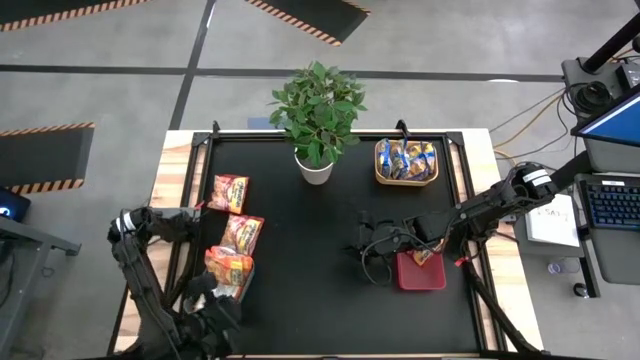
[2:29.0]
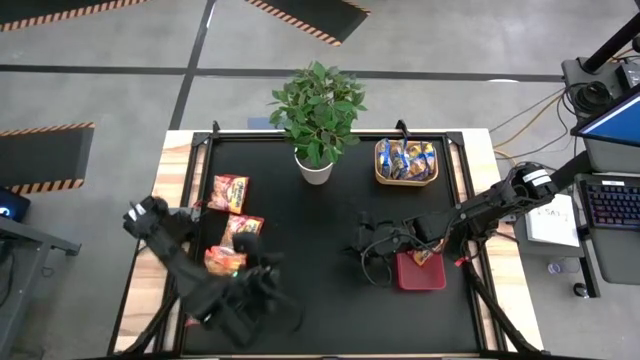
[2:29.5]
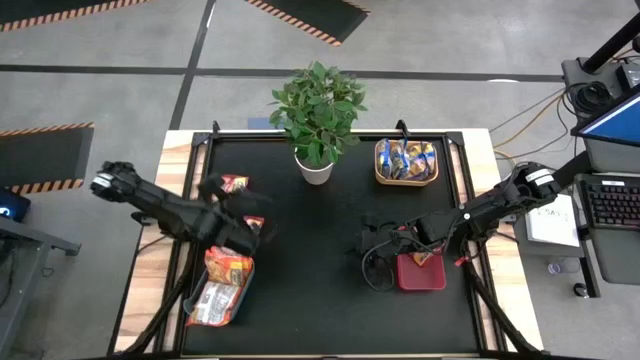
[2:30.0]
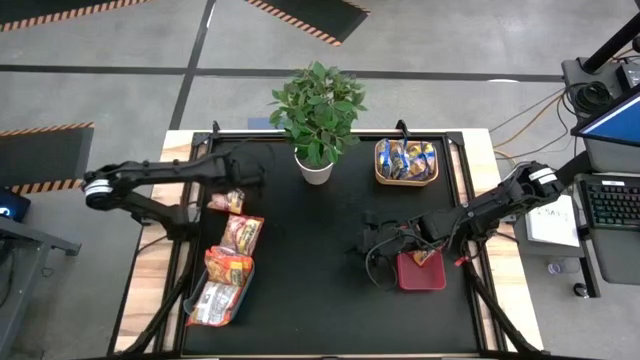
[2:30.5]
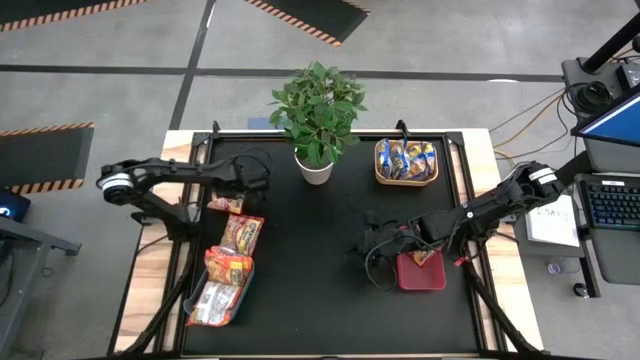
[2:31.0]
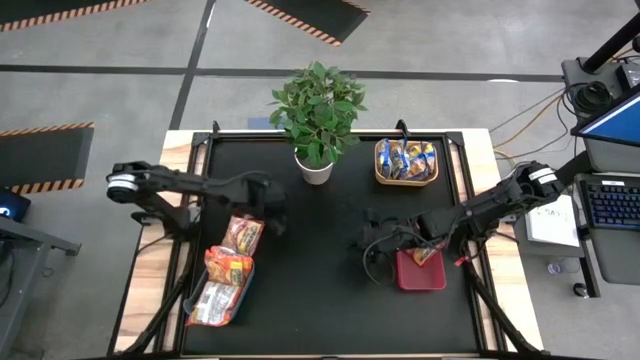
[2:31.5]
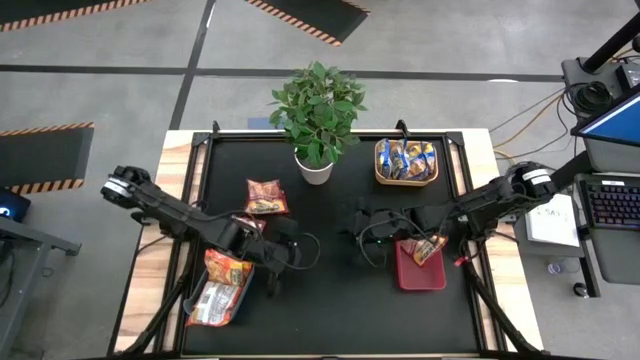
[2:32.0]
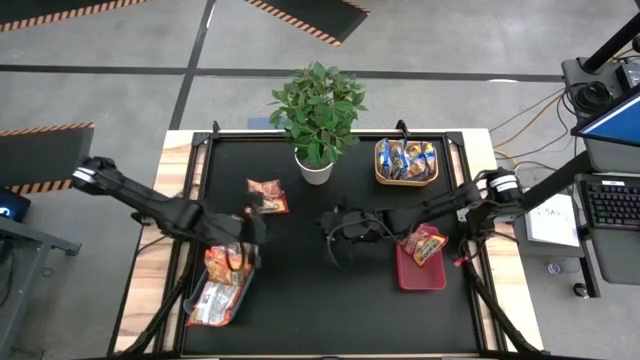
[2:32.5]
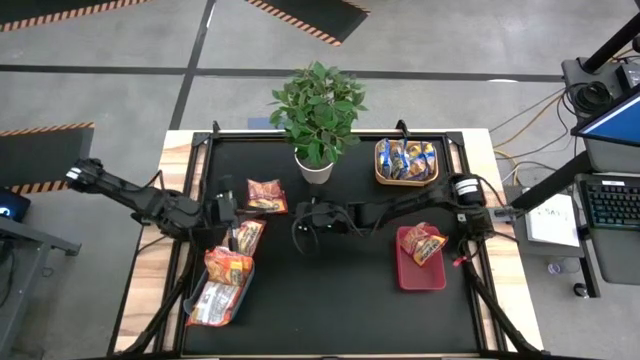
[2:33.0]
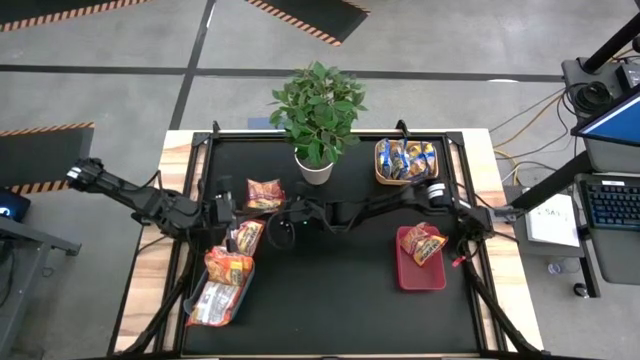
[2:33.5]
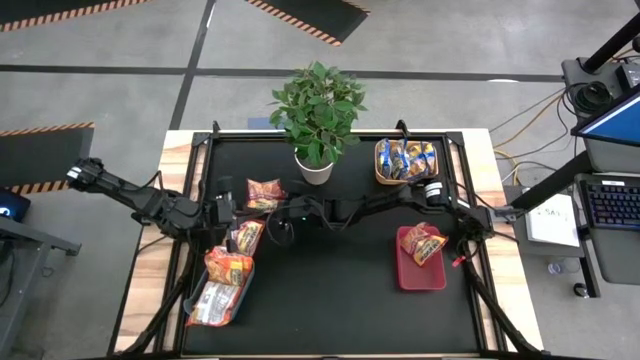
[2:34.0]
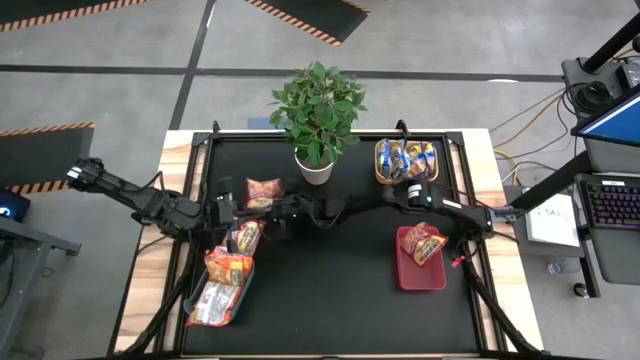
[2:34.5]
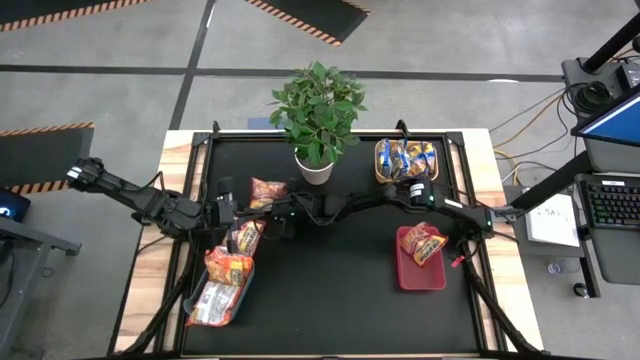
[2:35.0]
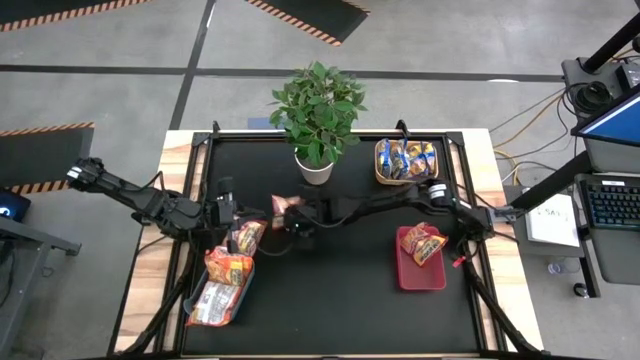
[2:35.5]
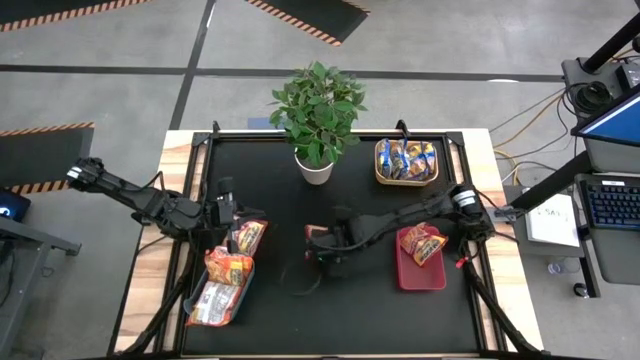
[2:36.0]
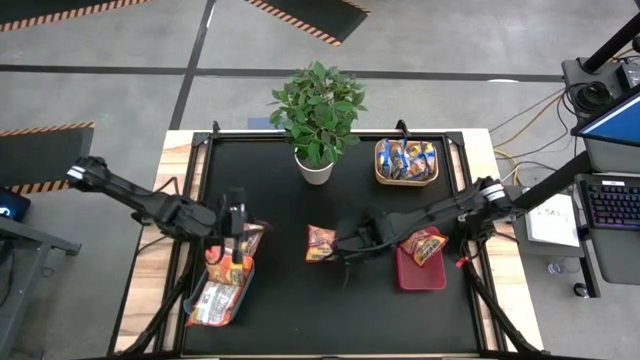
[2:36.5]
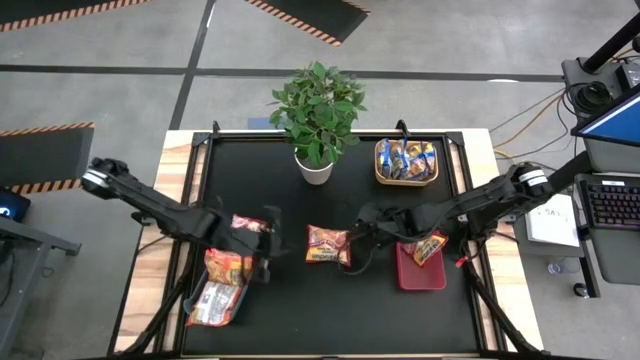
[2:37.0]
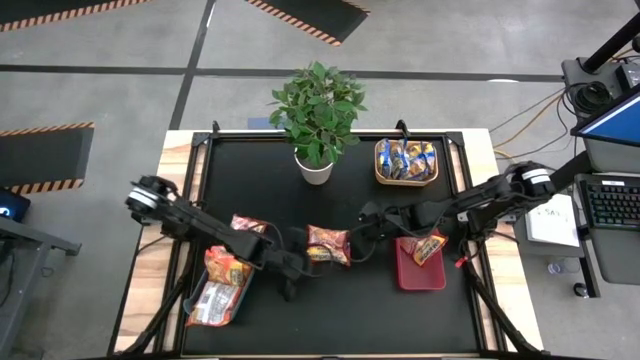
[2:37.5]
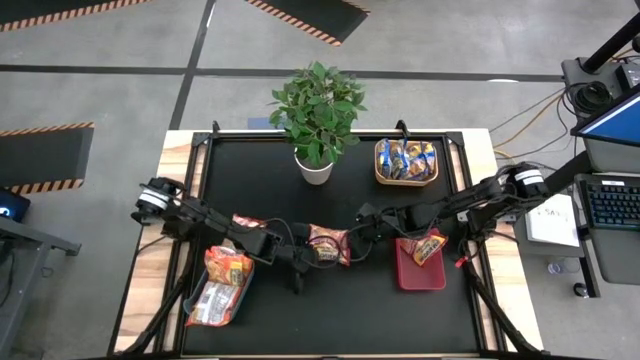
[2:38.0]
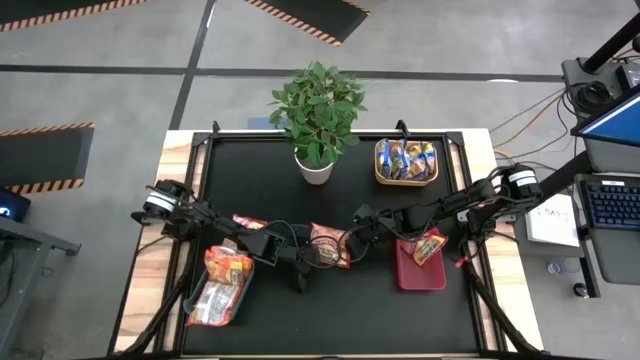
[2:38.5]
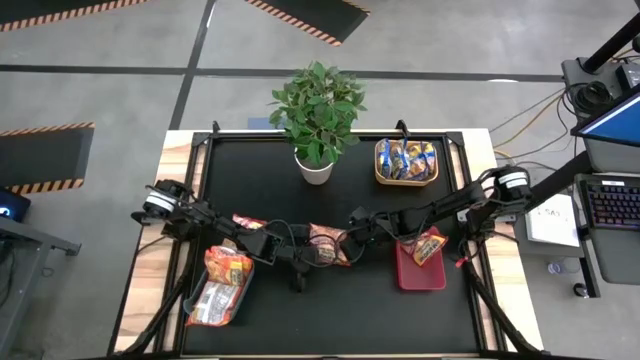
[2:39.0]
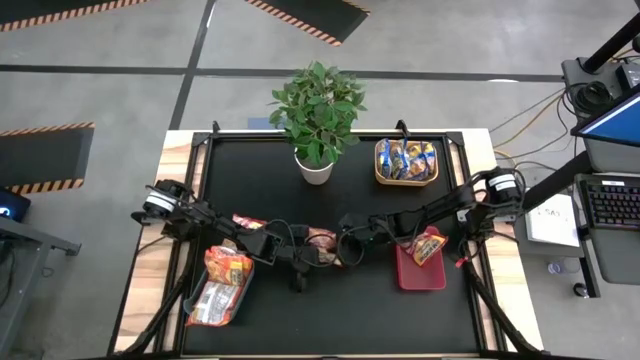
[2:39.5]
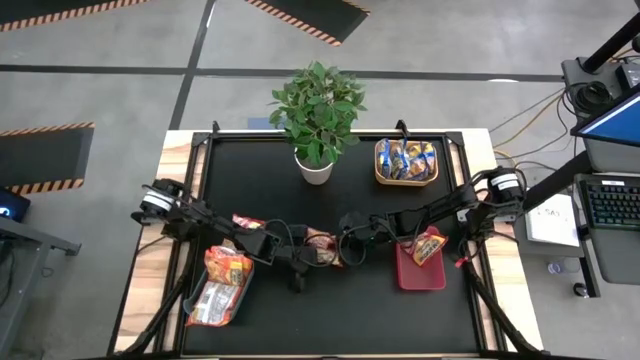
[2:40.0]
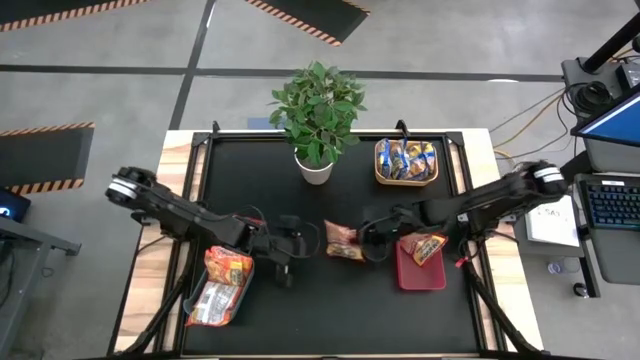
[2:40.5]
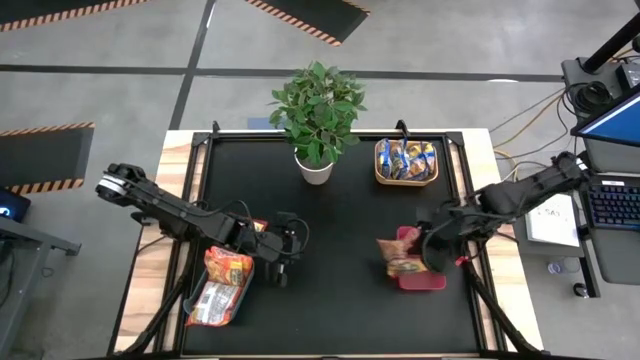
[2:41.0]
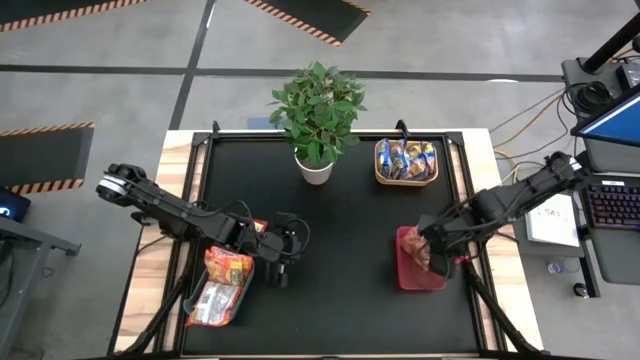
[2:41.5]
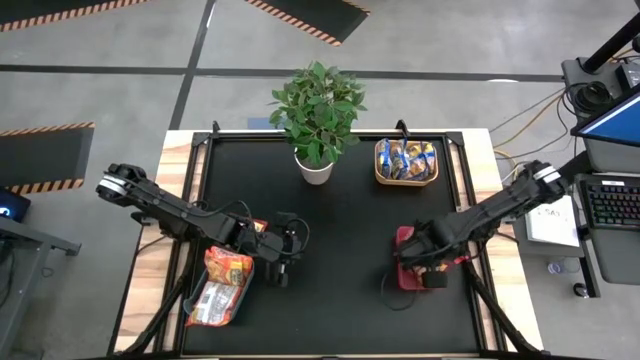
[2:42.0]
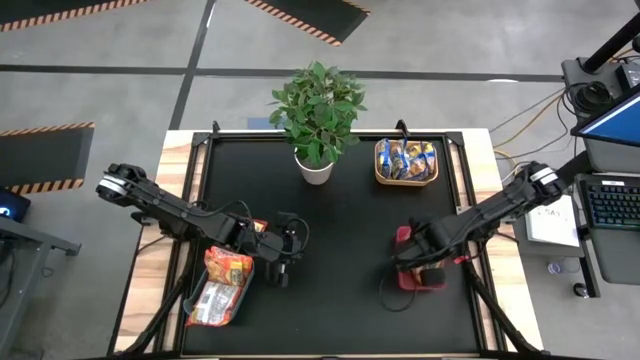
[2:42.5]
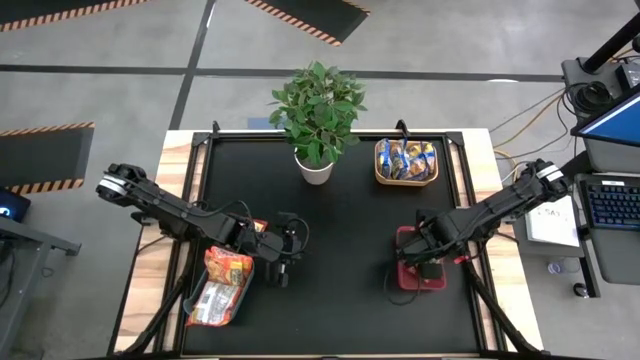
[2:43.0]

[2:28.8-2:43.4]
Task: Sort Maruchan noodles
Put the red noodle pack into the pink bin

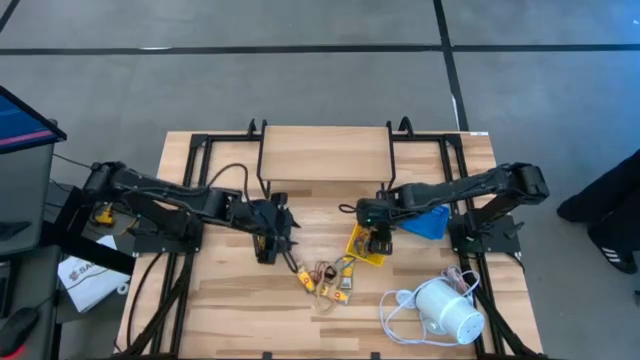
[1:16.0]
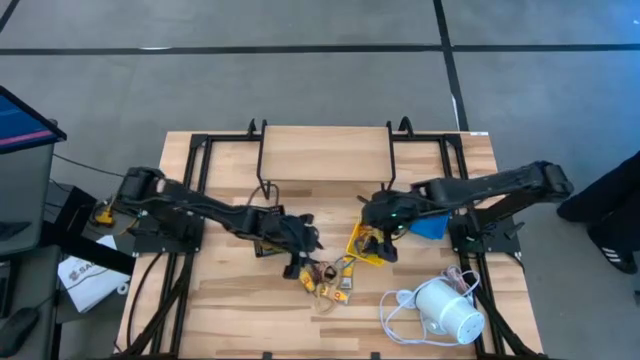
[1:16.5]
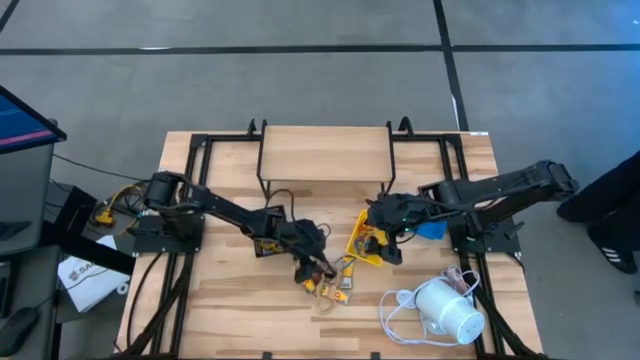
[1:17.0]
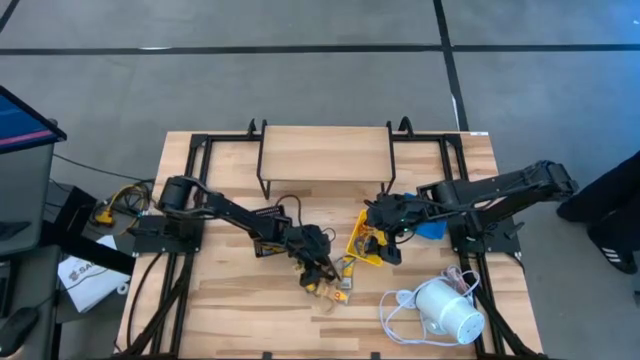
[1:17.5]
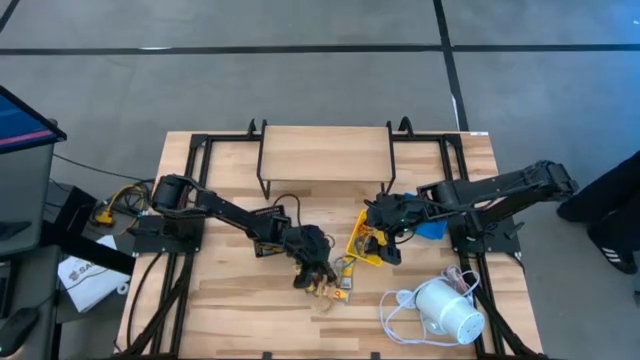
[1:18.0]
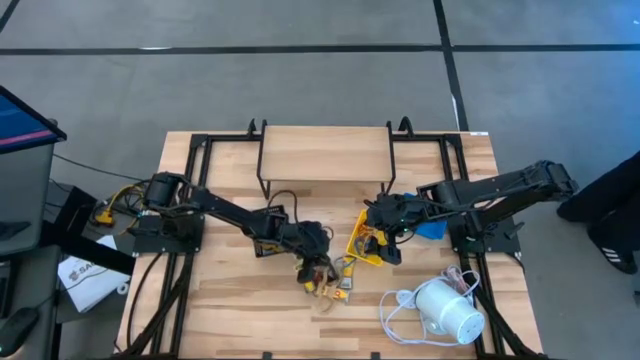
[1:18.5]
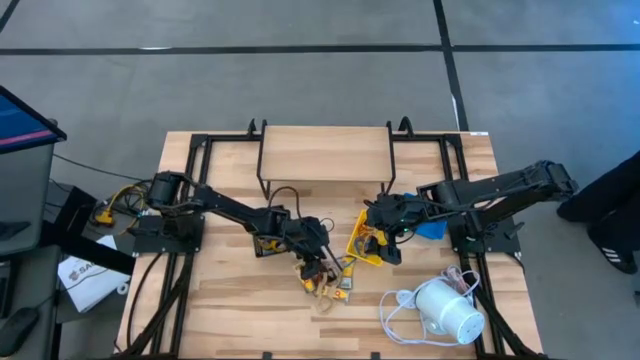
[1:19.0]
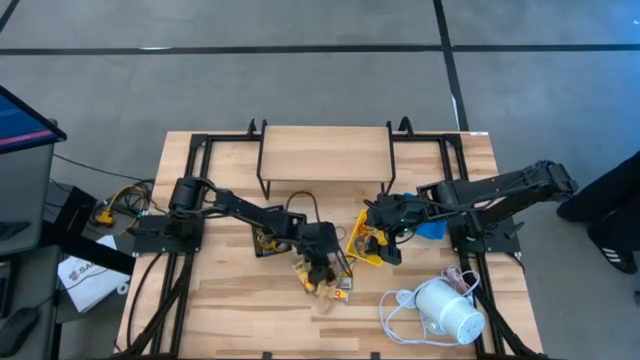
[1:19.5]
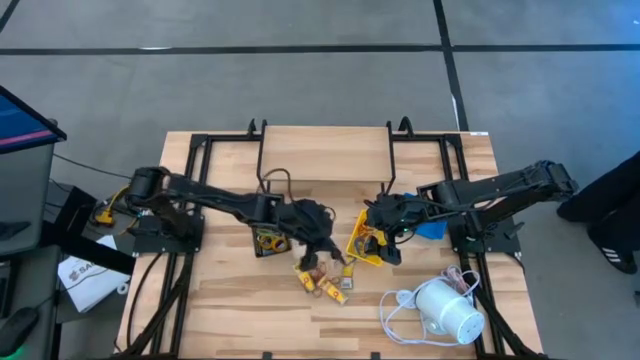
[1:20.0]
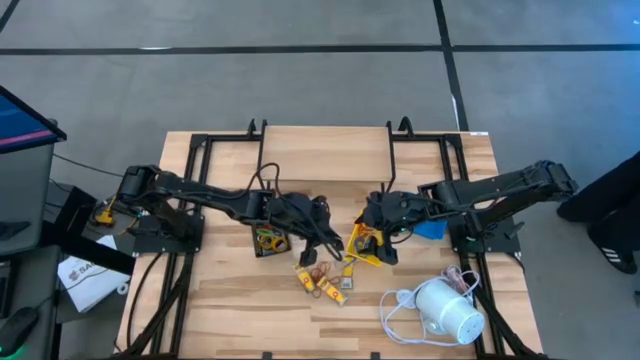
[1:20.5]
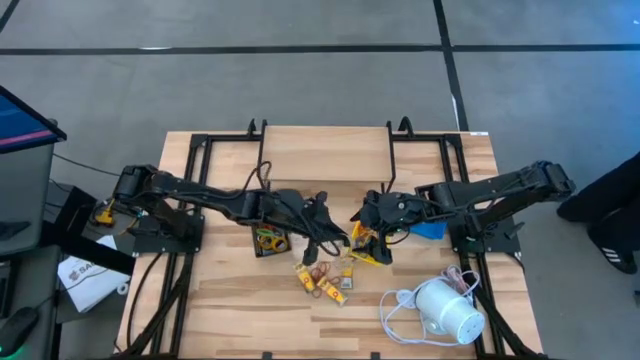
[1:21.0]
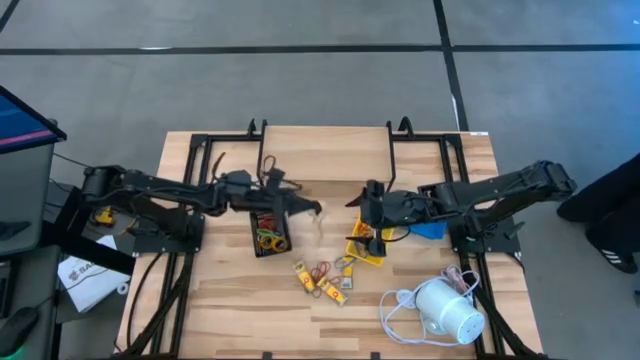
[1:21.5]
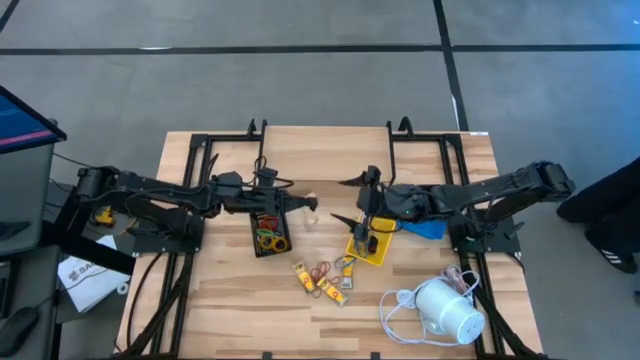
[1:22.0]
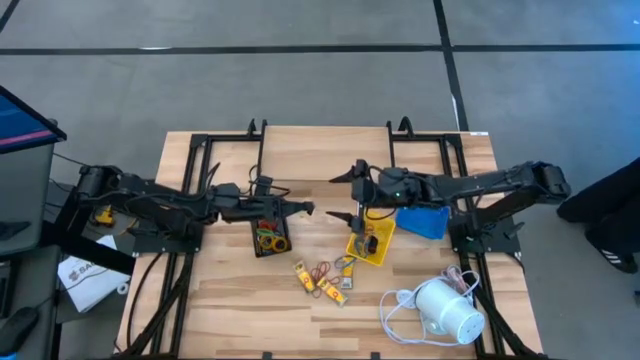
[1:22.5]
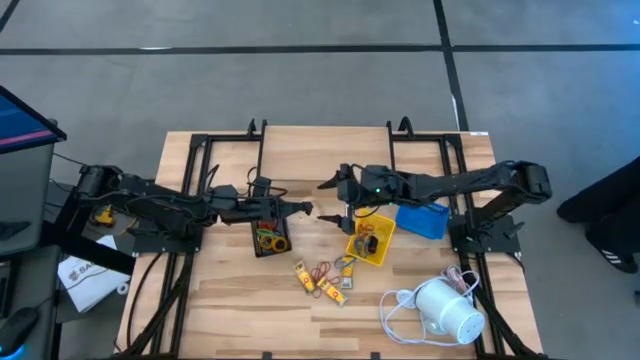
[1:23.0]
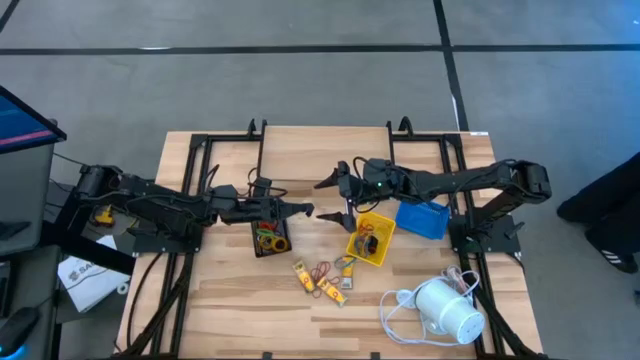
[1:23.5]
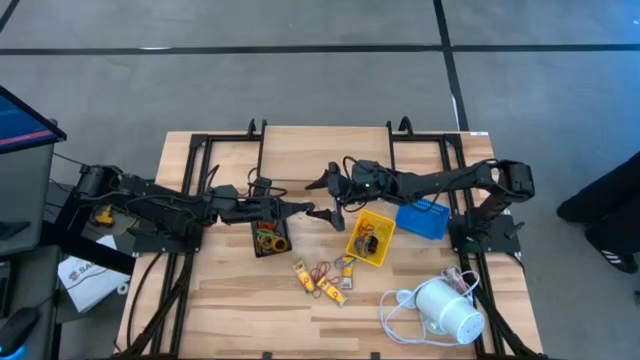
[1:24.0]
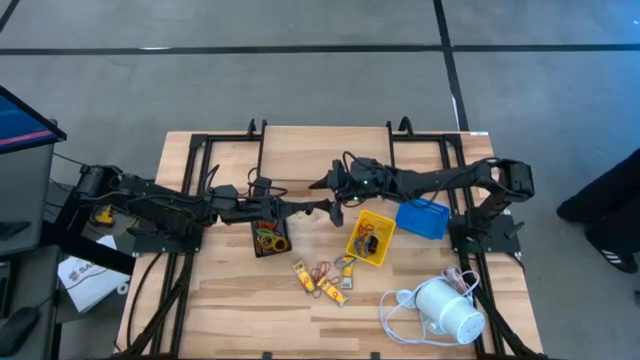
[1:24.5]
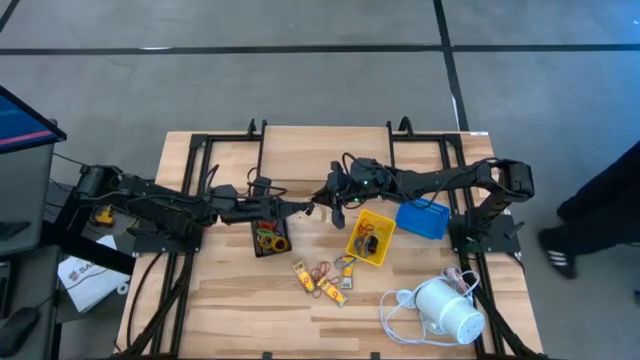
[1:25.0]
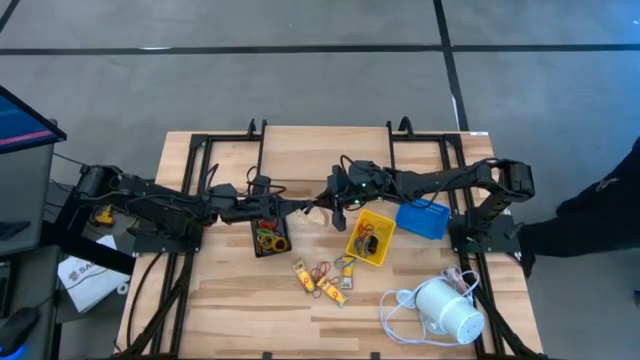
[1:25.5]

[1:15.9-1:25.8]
Task: Pick & Place Office Desk Supplies
Put the light brown rubber band into the yellow bin
